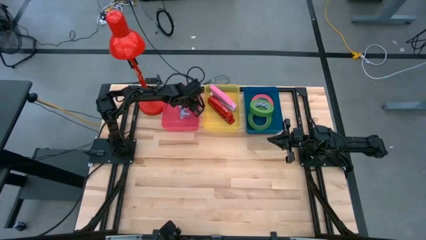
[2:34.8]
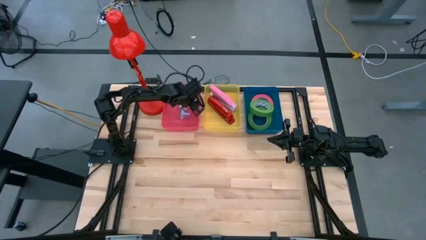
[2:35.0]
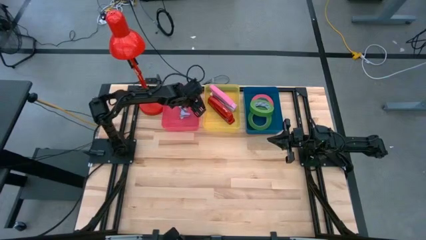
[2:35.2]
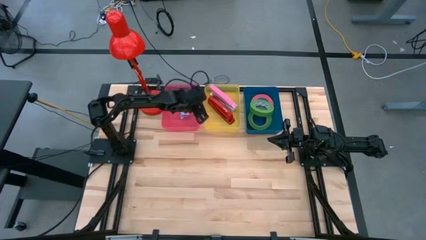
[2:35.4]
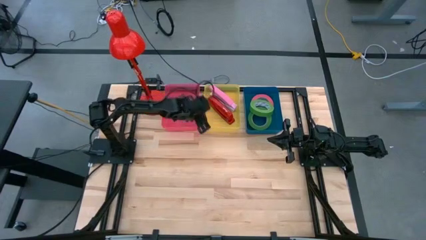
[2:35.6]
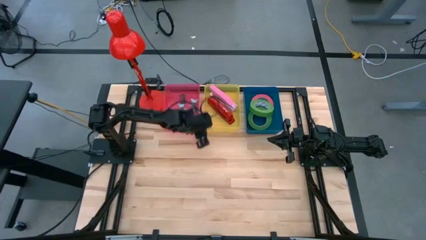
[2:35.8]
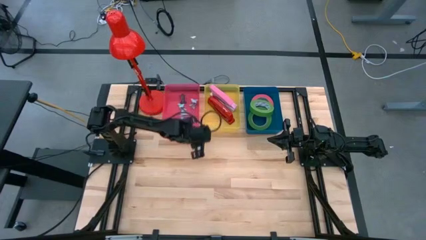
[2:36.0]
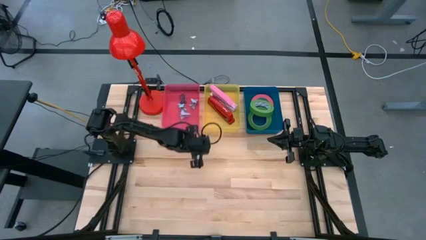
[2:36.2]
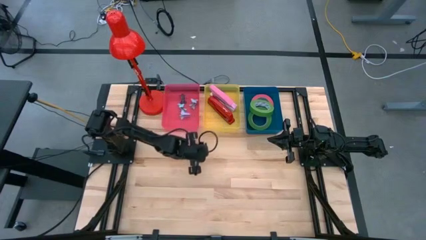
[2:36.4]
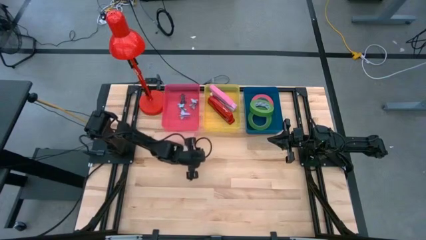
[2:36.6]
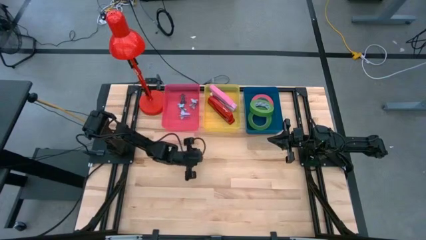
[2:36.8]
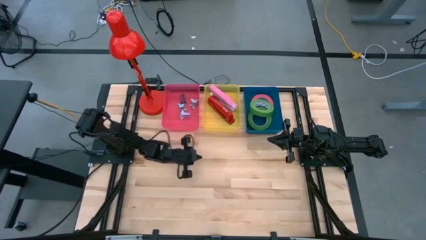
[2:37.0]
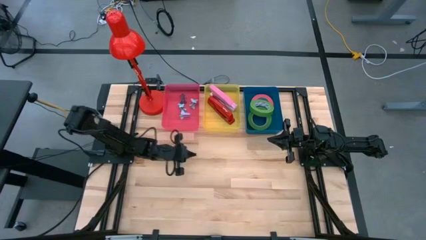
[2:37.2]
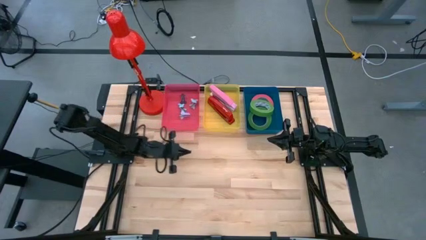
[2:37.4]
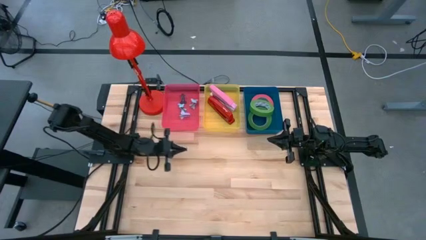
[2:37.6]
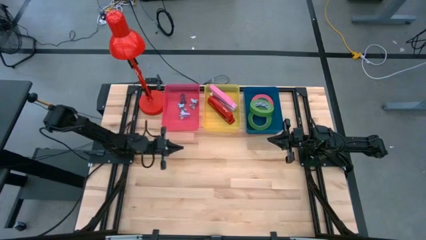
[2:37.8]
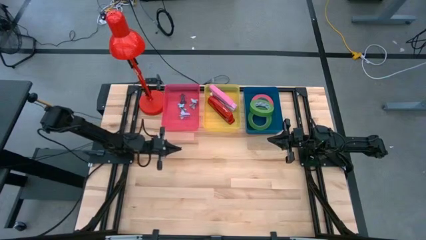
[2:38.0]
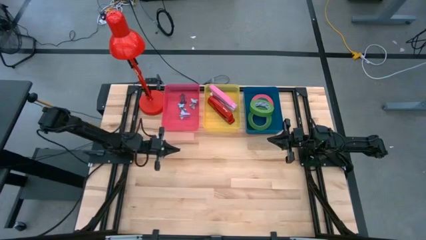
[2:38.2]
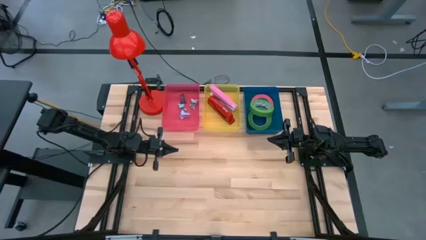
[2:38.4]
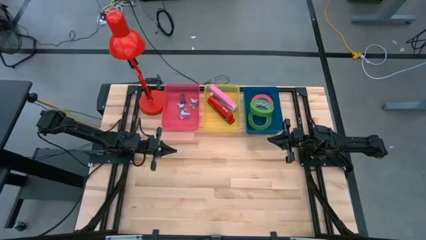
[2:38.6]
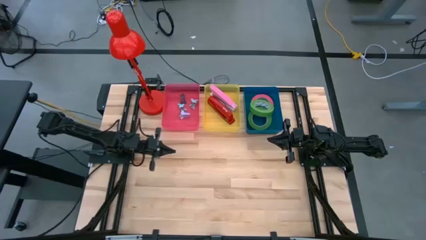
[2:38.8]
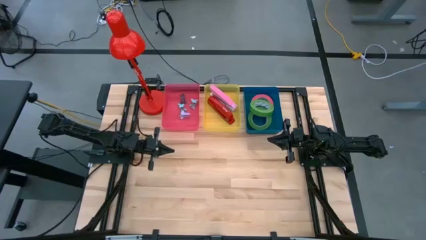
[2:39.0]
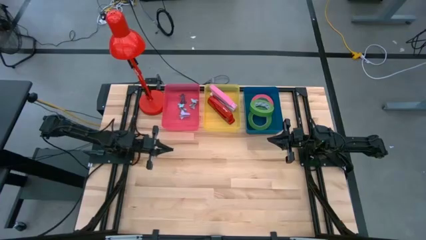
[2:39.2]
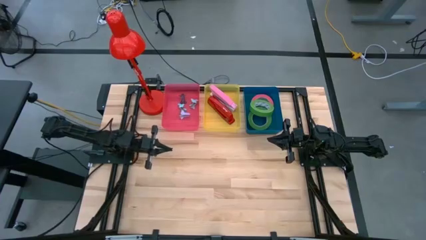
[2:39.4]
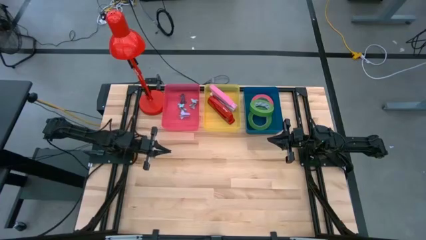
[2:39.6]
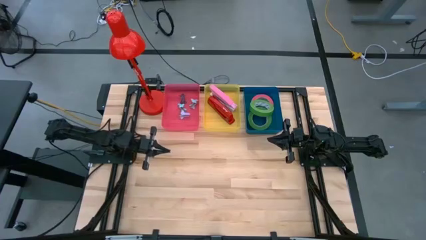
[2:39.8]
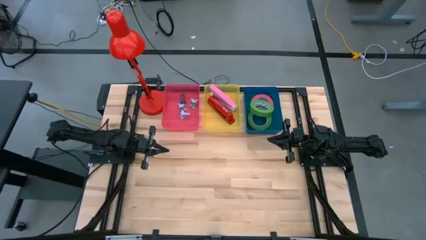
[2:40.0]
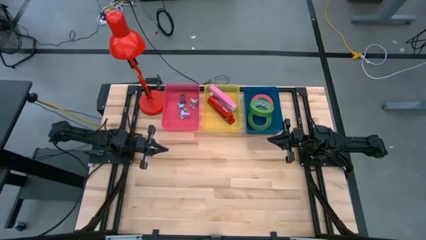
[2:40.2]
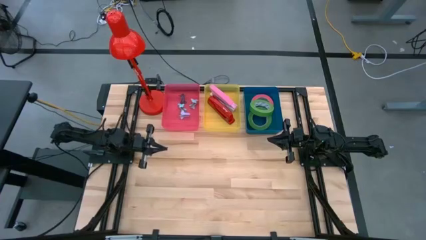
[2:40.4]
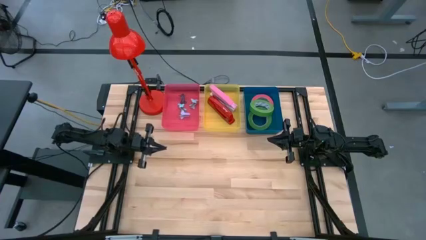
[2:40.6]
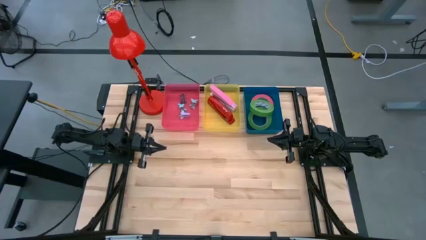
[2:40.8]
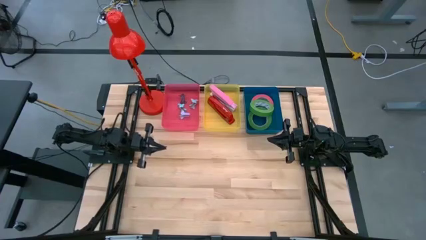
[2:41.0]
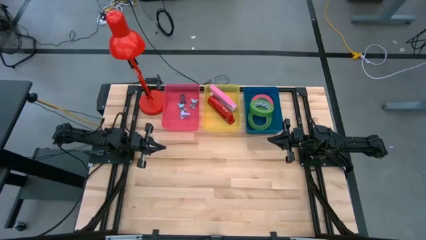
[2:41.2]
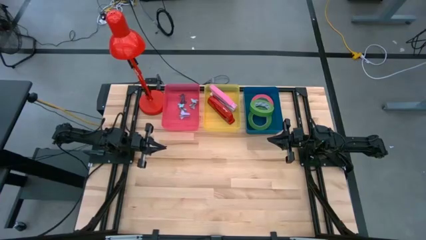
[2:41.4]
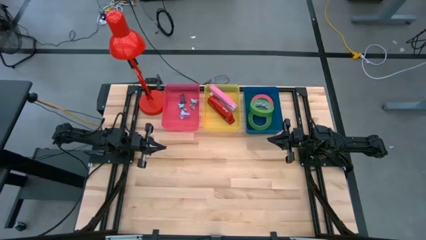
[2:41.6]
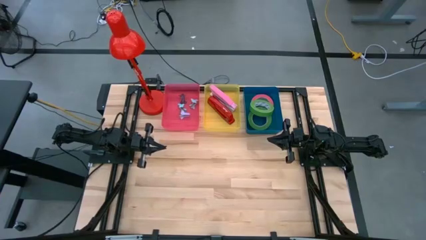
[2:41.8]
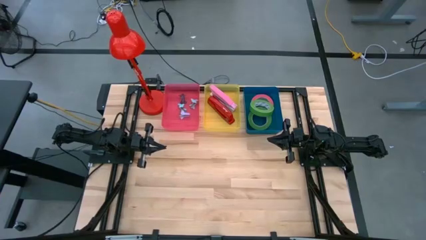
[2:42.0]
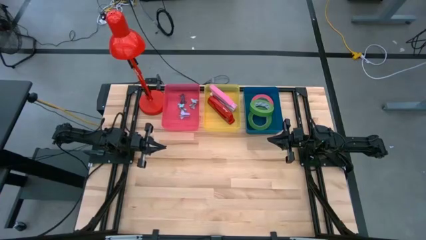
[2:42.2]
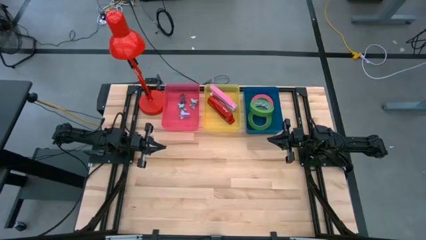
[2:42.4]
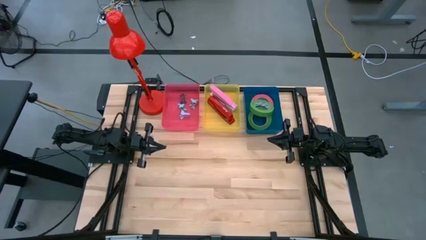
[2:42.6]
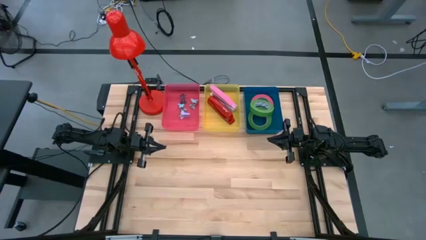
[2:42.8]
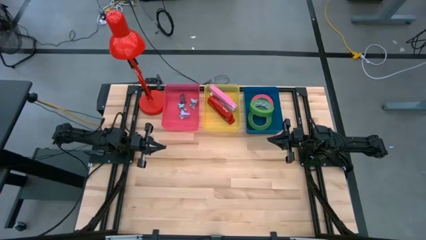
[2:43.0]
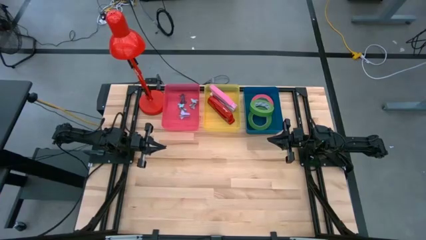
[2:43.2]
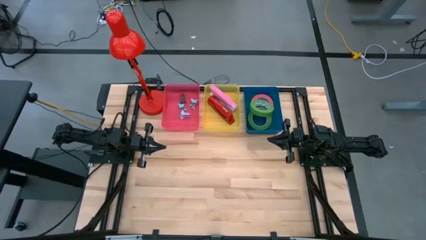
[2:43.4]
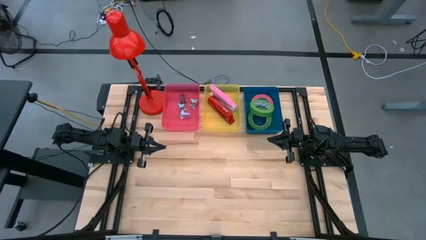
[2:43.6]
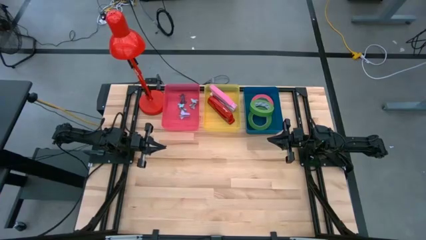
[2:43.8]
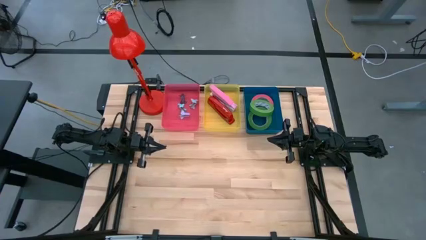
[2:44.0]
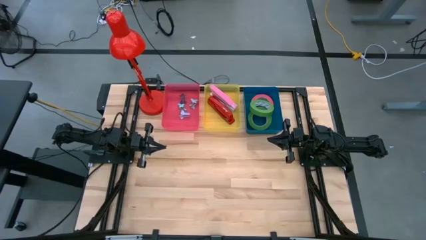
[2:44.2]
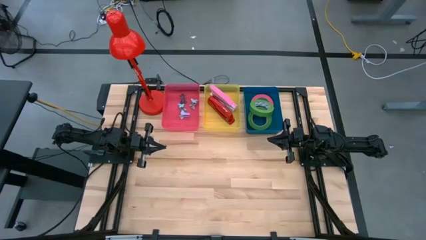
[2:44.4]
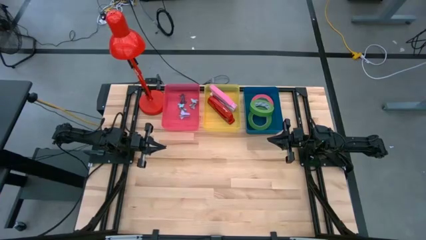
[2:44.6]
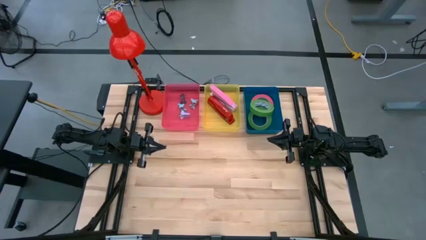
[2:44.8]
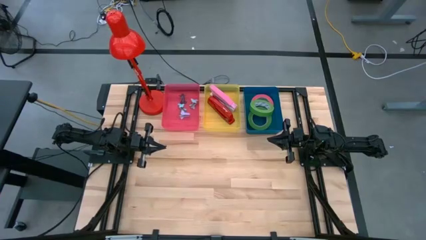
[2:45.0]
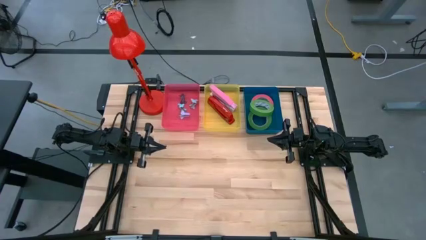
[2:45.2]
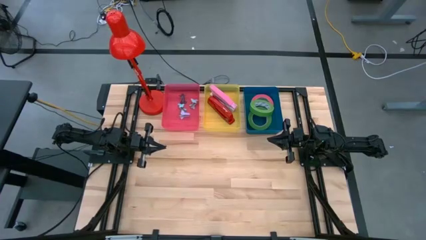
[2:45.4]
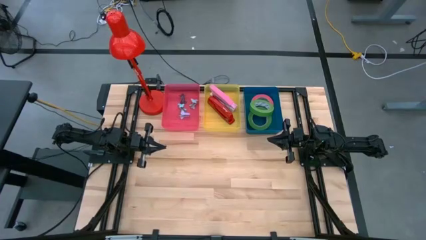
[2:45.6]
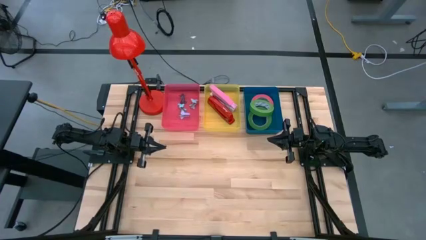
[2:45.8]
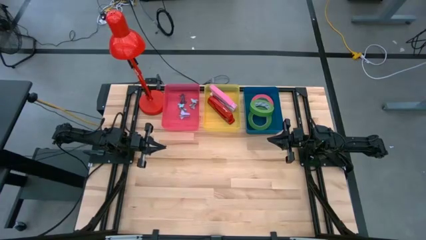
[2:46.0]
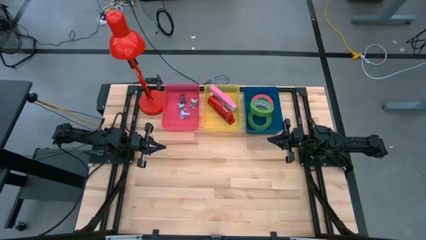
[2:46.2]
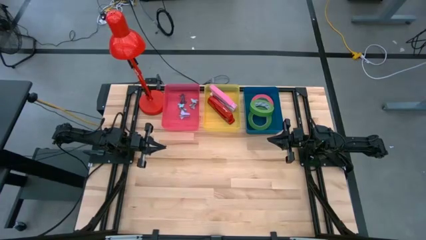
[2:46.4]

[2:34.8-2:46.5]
Task: Pick and place Stapler, Stapler remover, tape
Return to Home Position
